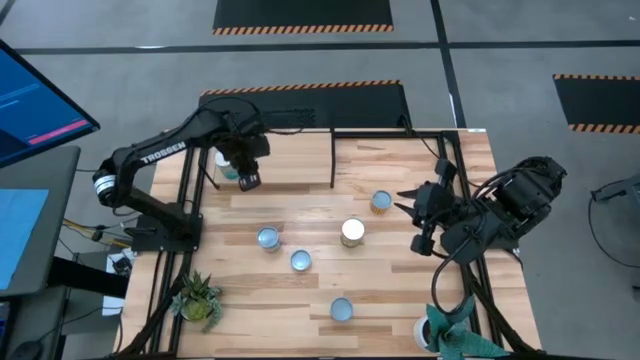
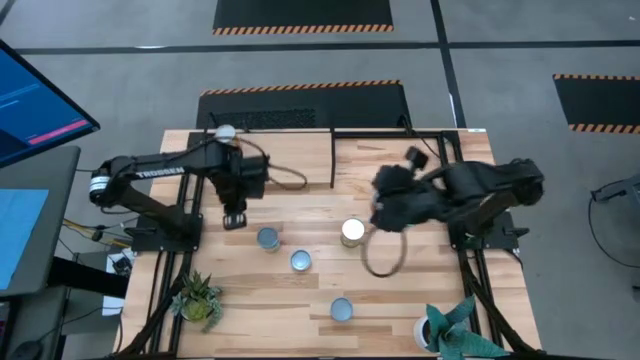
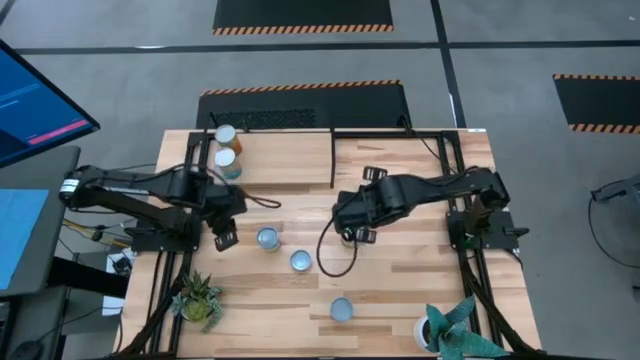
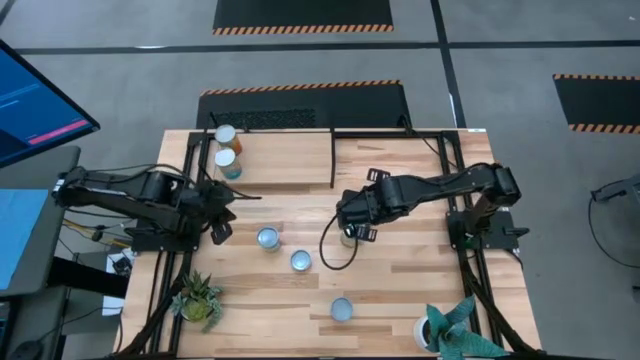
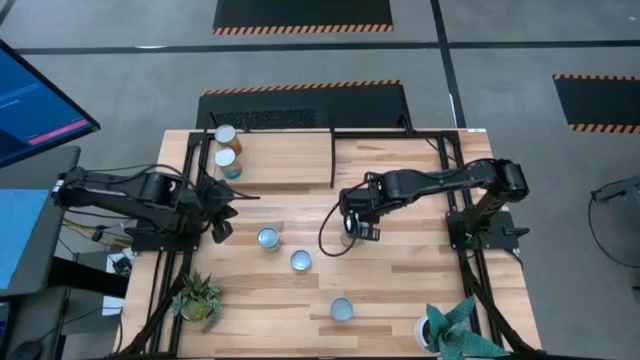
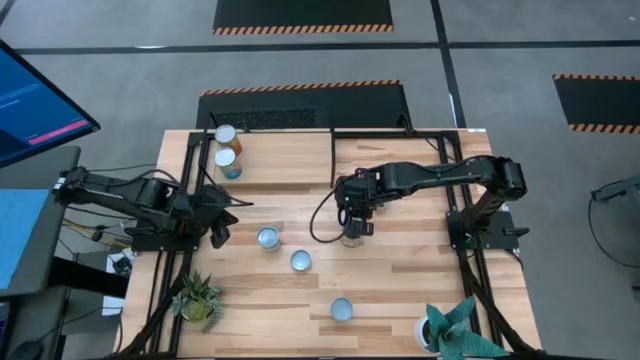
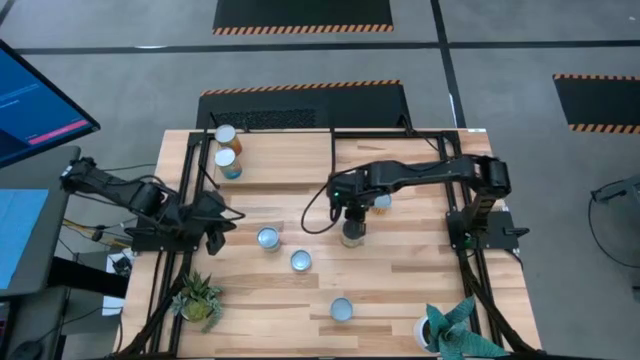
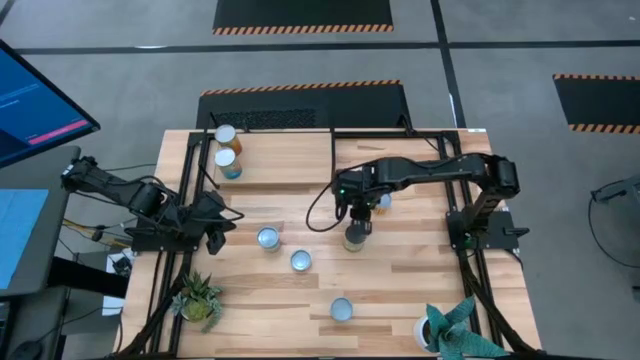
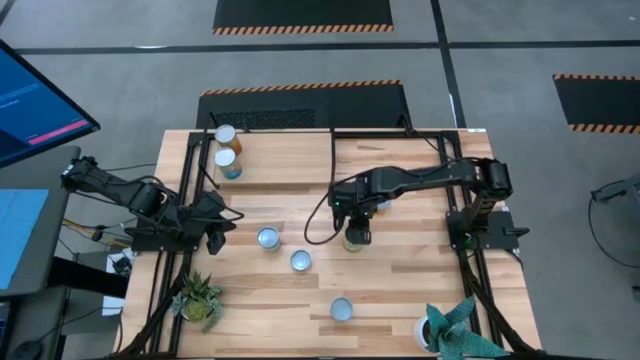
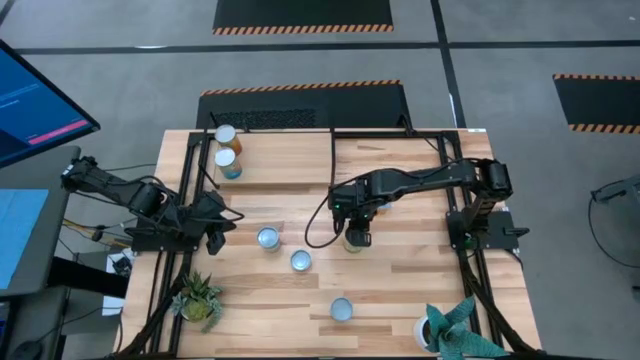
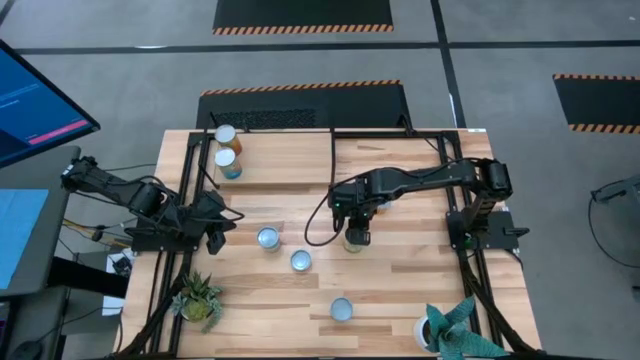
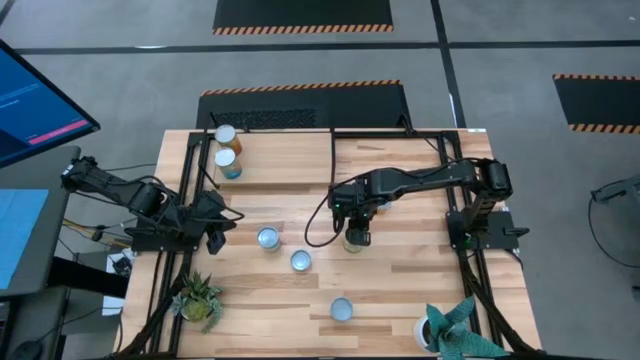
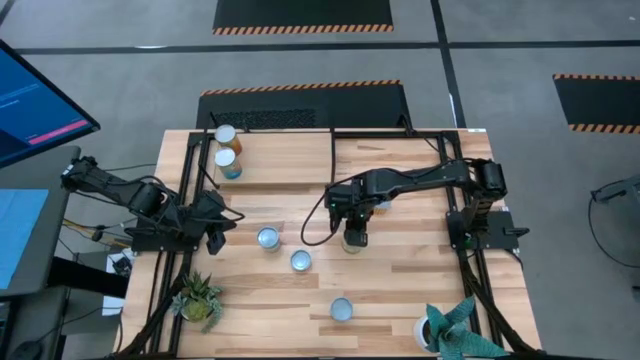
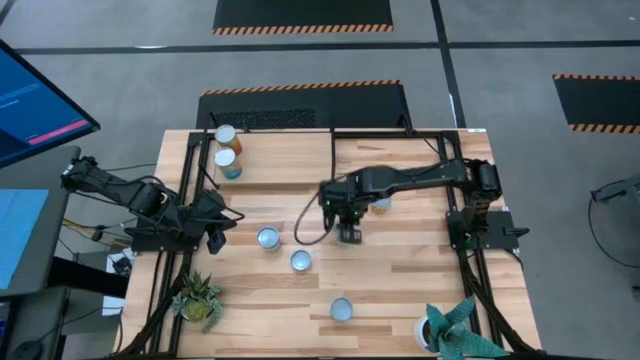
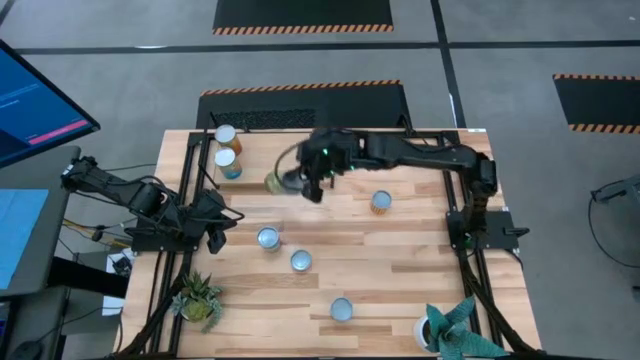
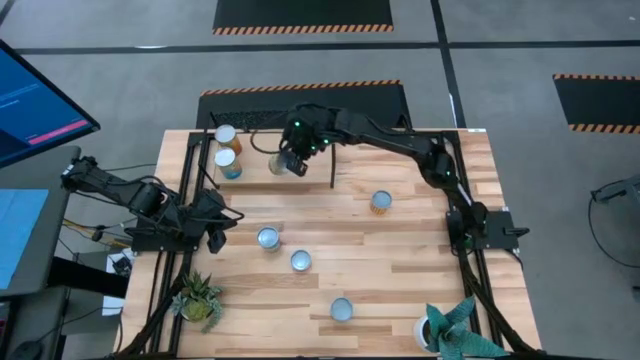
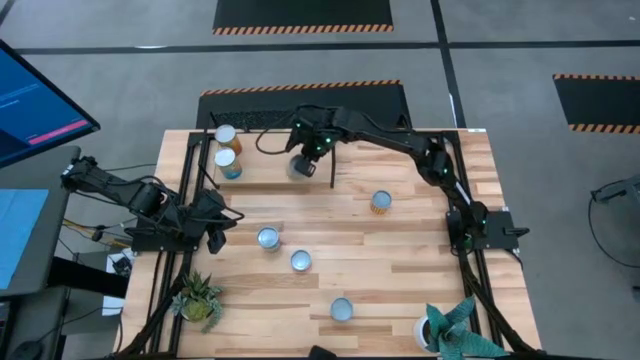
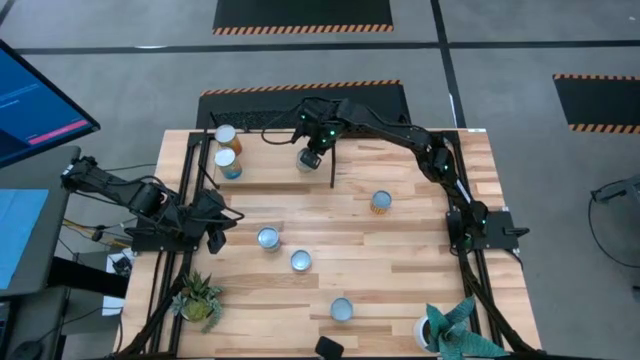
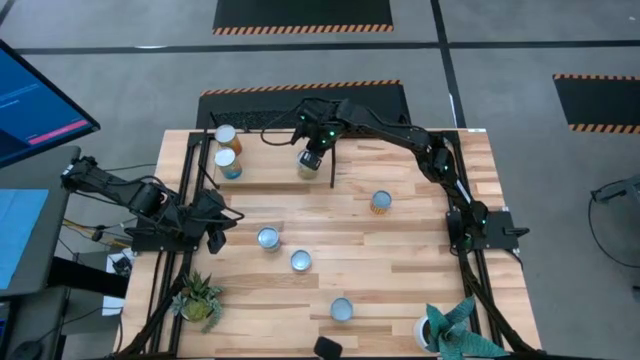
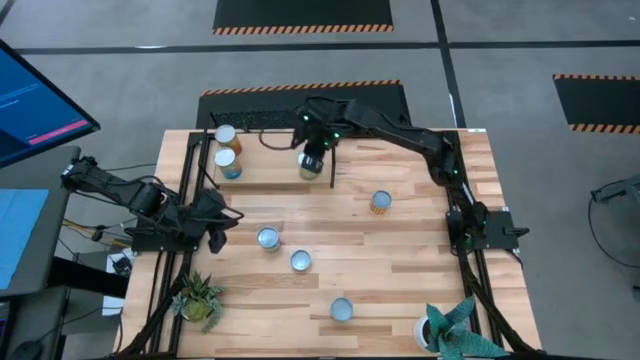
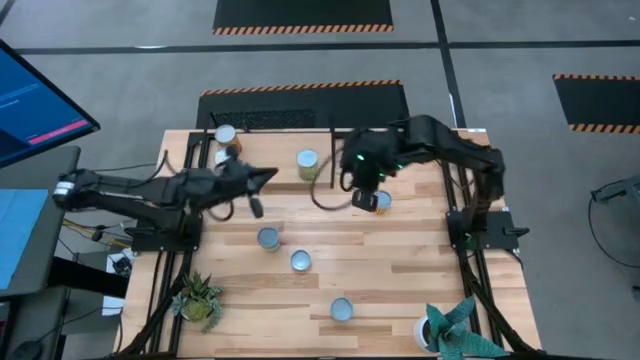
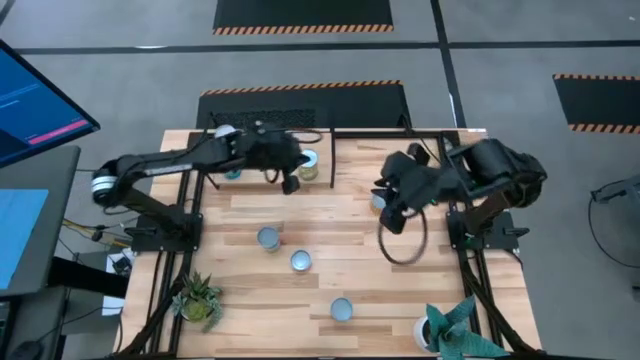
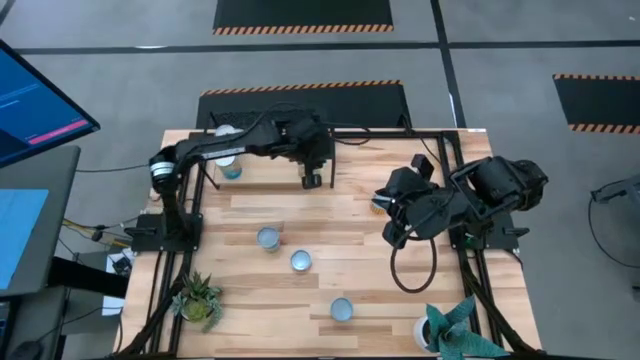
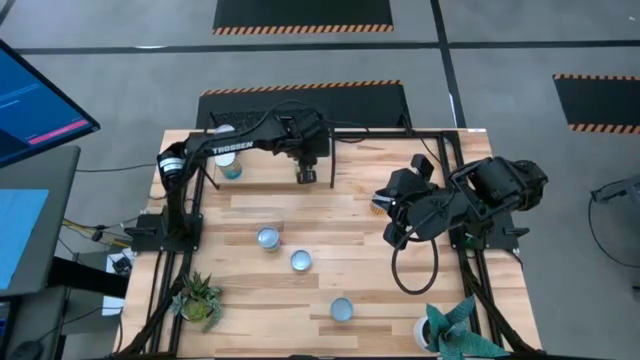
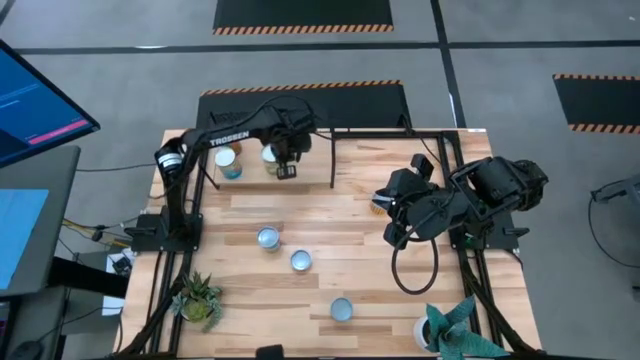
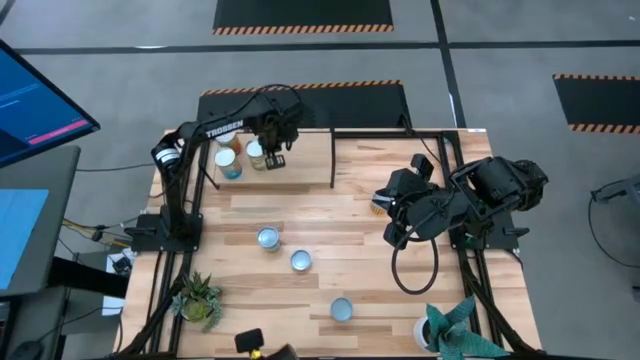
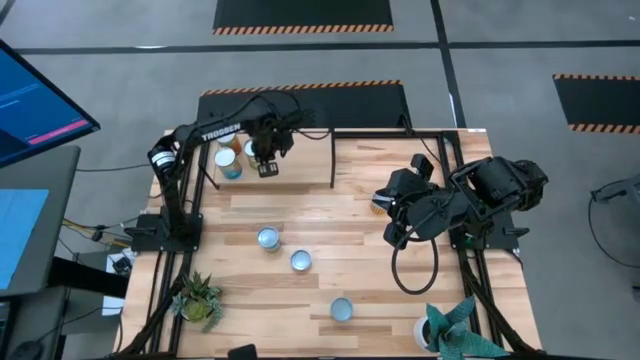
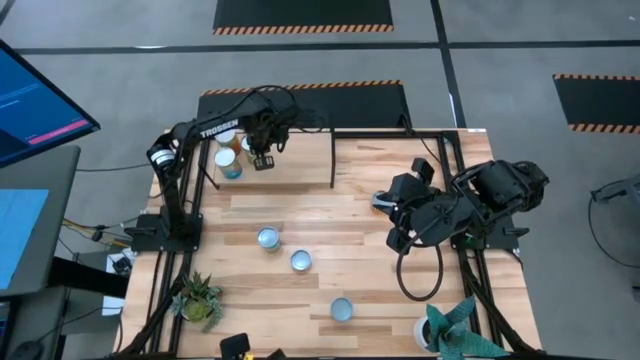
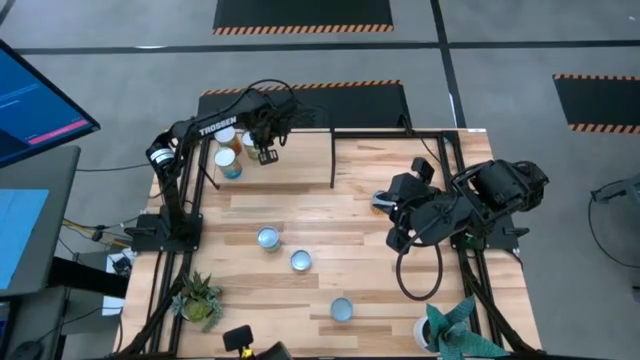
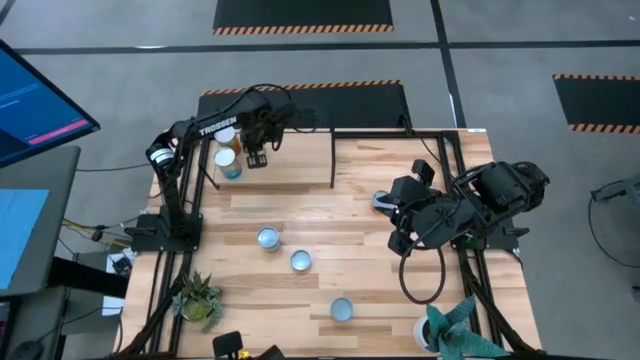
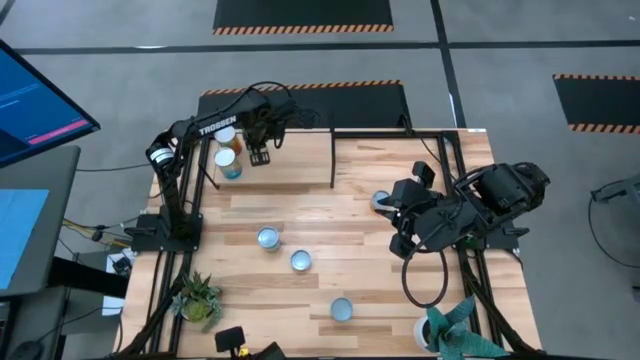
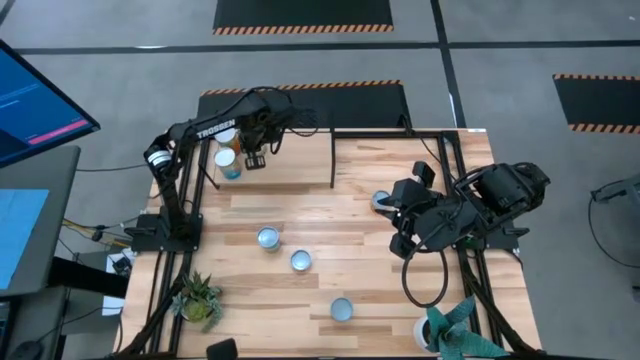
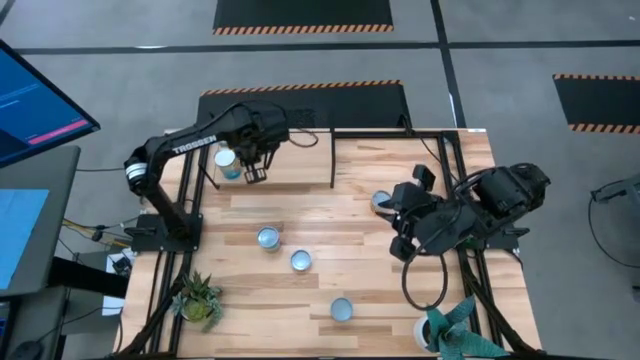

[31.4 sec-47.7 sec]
Task: Pick and place cans onto a shelf
Put the pears can on the shelf aligned with the green green peas can

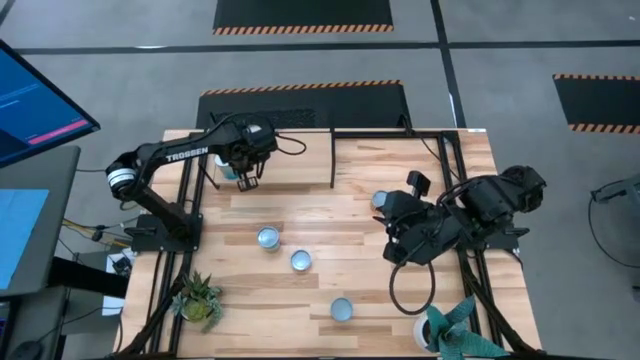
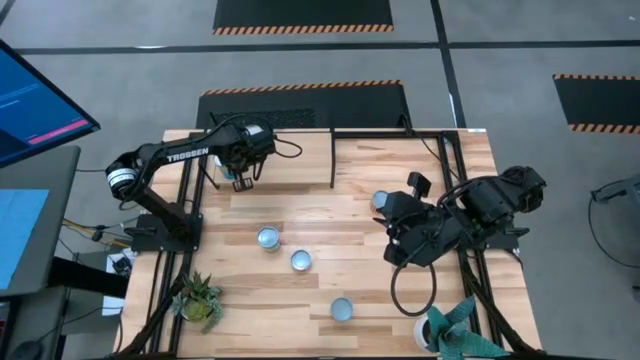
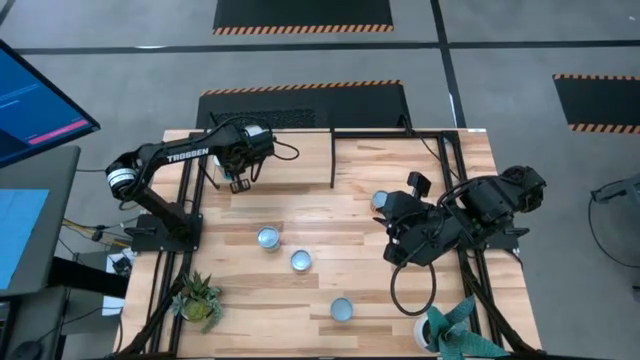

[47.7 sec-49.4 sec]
Adjust the tomatoes can

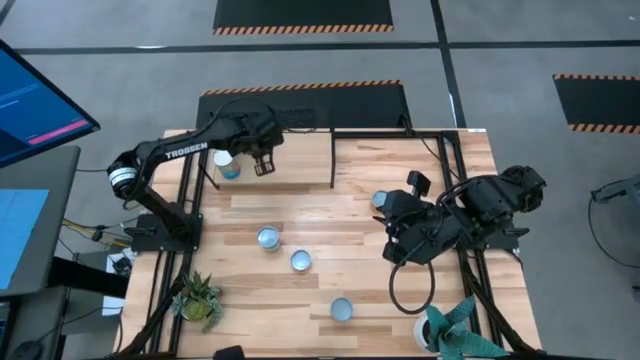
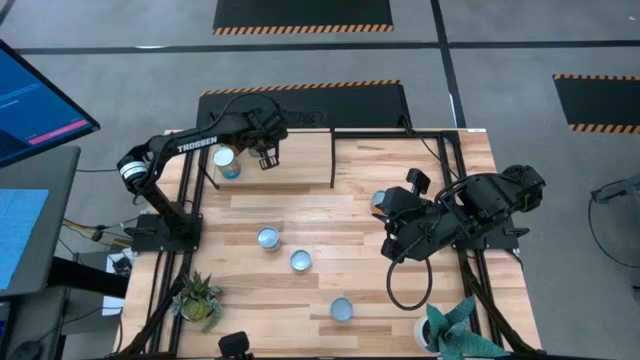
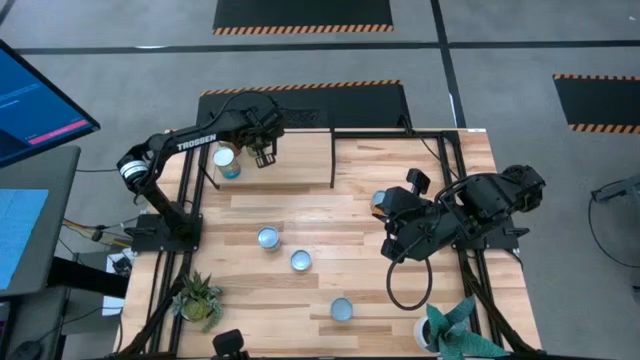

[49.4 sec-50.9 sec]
Adjust the pears can

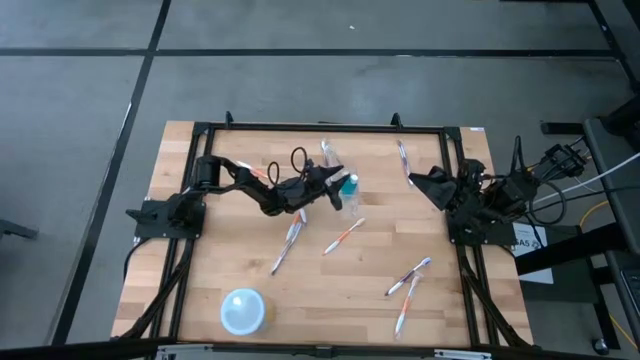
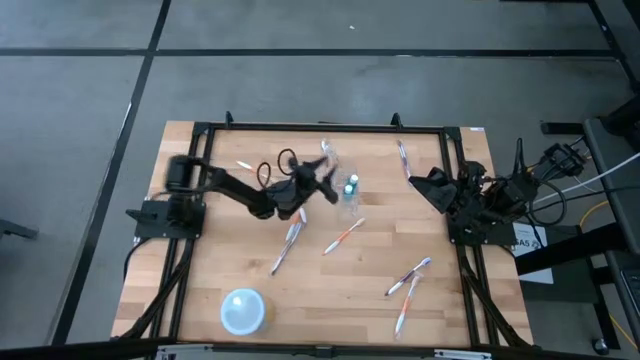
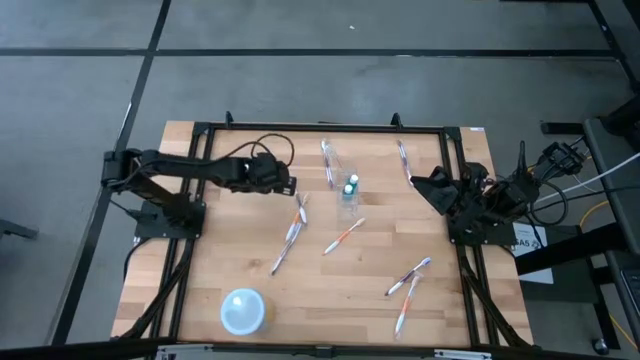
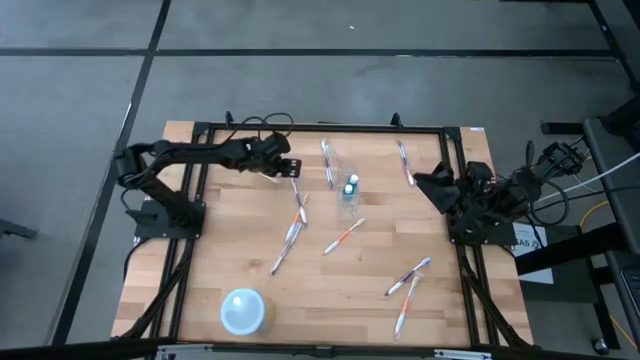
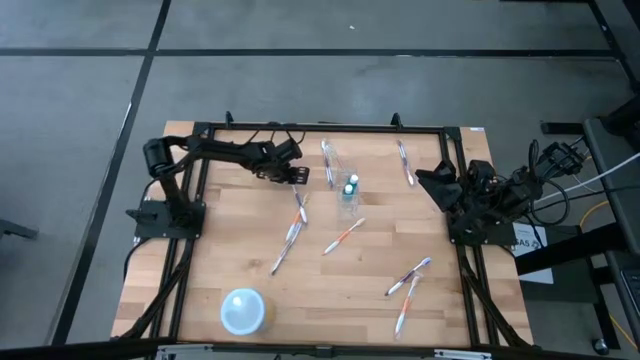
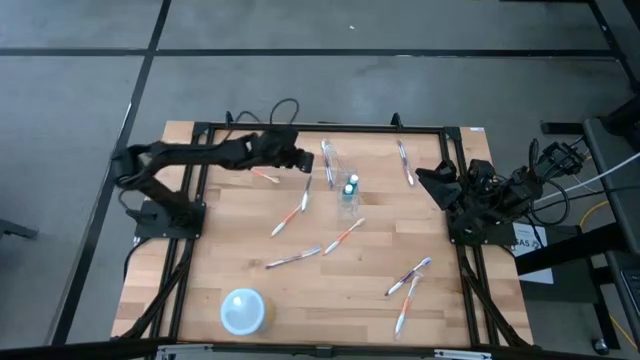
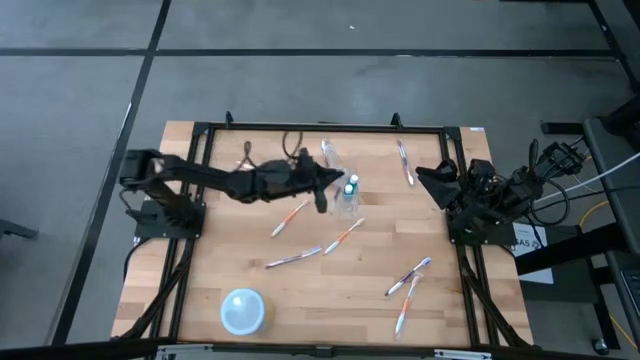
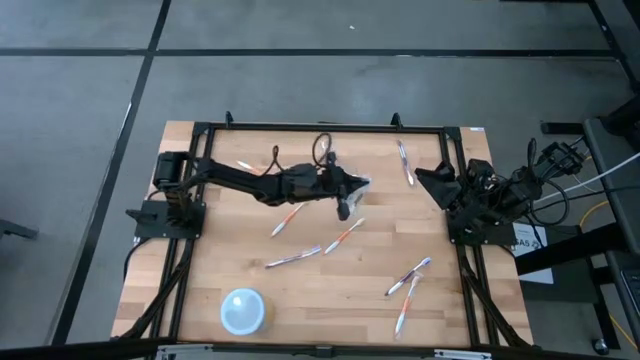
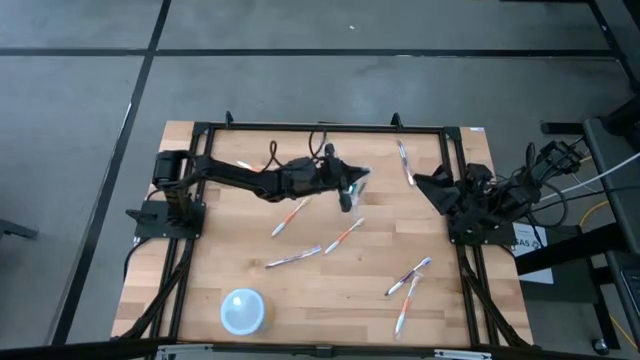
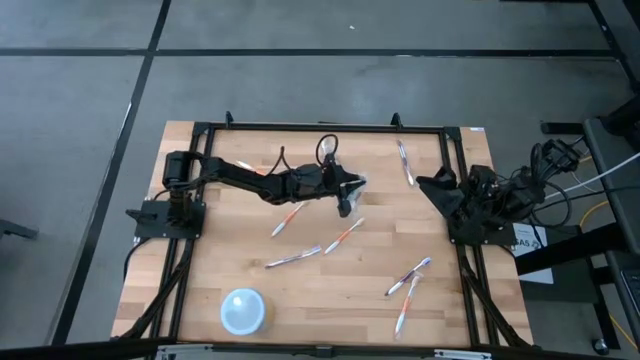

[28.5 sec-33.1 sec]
Task: Pick & Place toothbrushing station
Put the purple toothbrush into the transparent organizer
